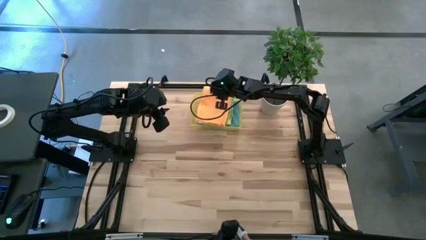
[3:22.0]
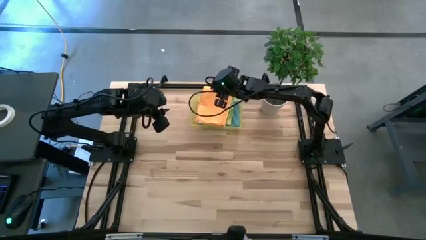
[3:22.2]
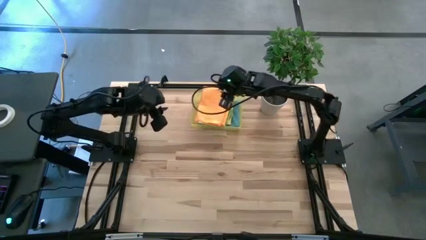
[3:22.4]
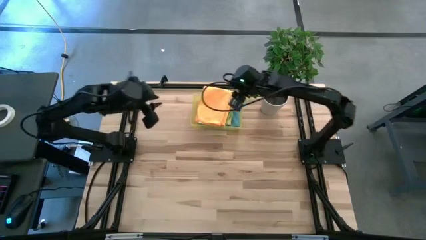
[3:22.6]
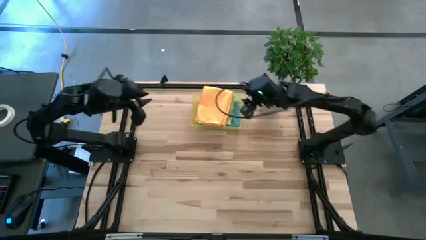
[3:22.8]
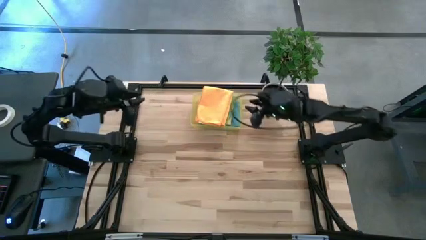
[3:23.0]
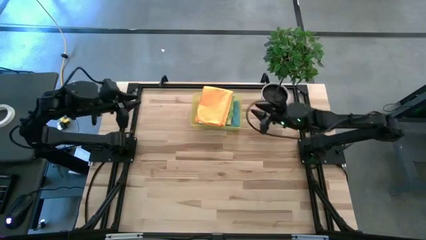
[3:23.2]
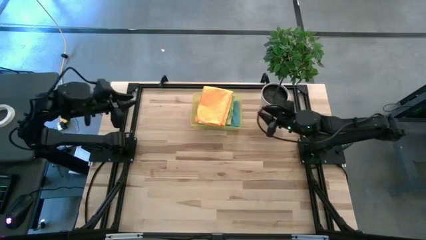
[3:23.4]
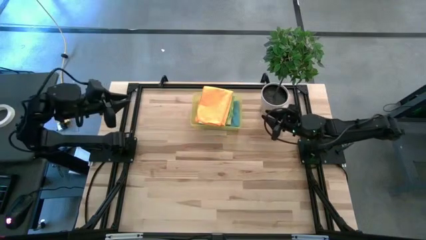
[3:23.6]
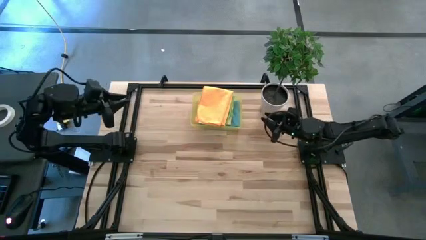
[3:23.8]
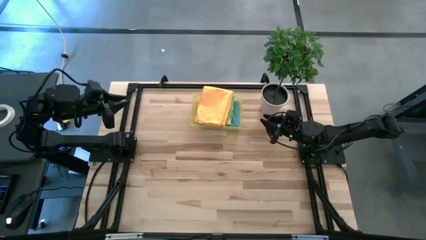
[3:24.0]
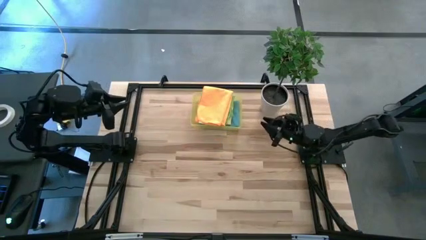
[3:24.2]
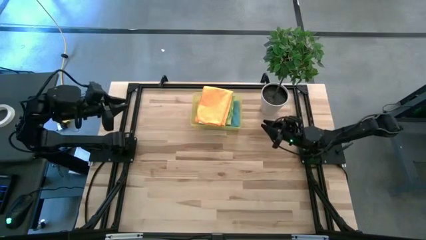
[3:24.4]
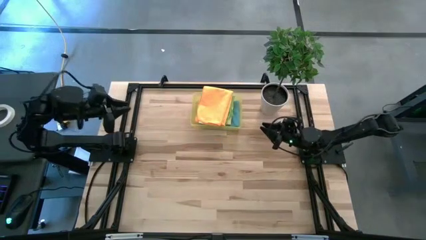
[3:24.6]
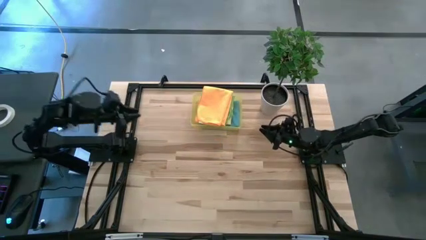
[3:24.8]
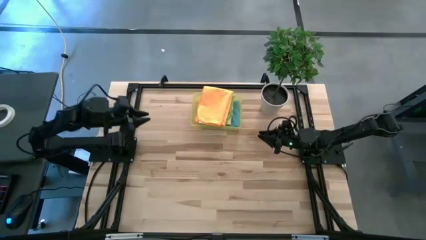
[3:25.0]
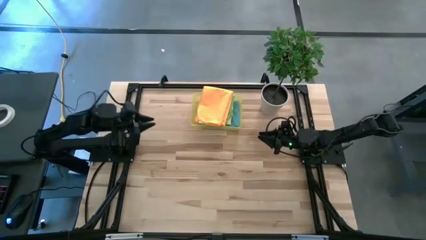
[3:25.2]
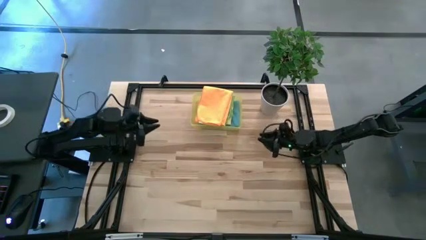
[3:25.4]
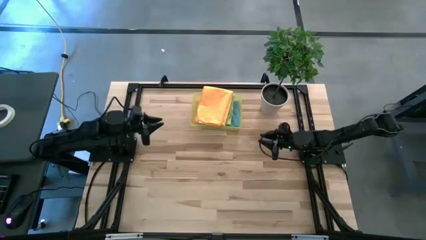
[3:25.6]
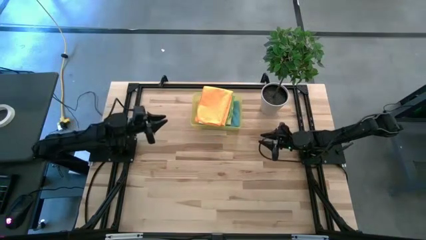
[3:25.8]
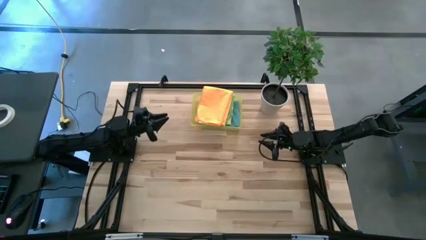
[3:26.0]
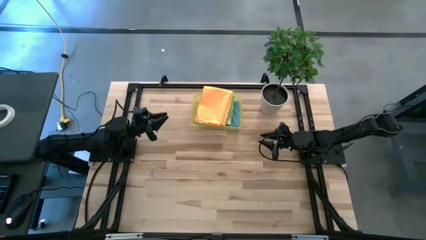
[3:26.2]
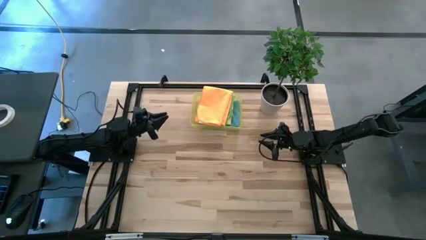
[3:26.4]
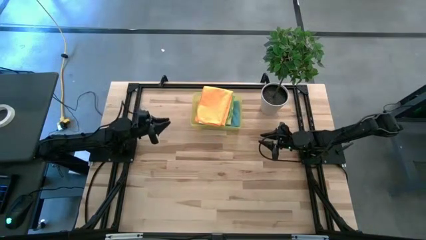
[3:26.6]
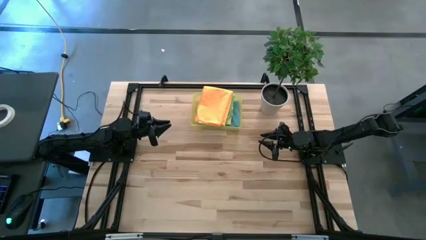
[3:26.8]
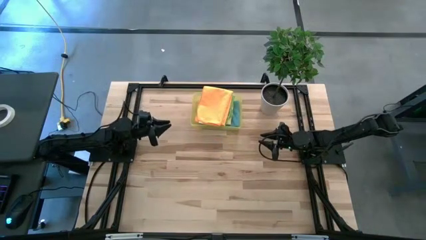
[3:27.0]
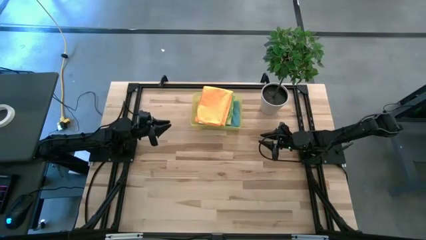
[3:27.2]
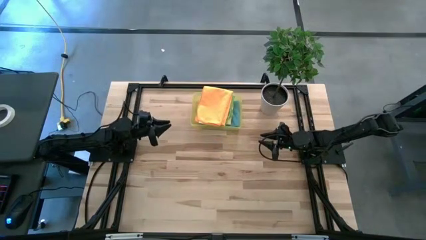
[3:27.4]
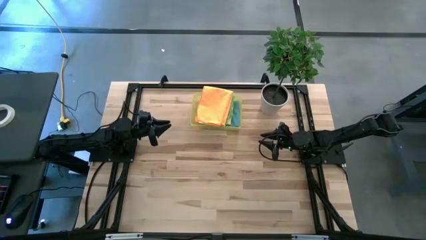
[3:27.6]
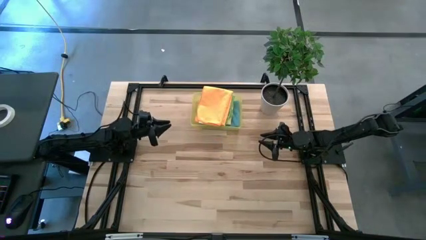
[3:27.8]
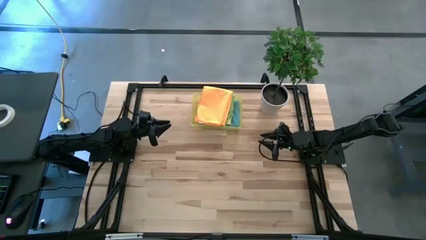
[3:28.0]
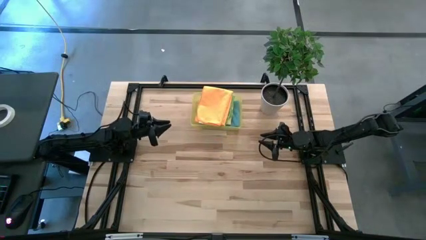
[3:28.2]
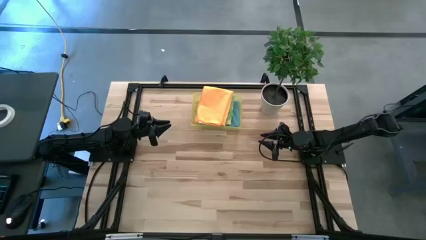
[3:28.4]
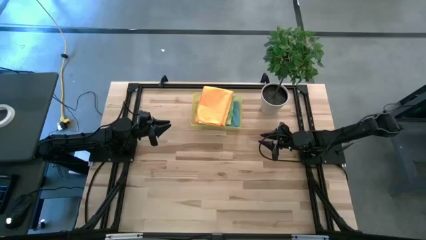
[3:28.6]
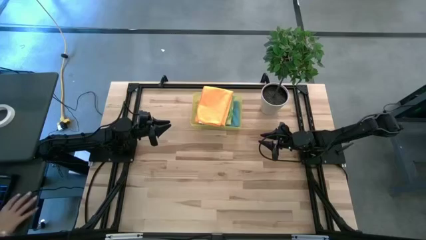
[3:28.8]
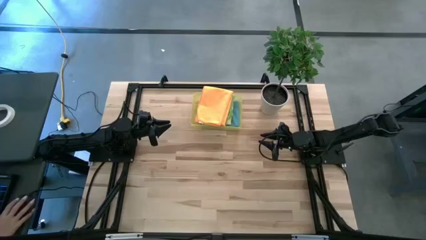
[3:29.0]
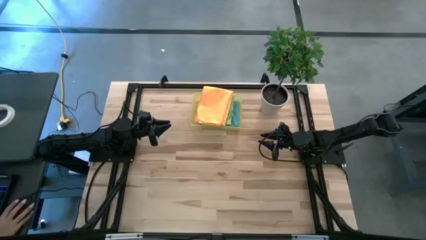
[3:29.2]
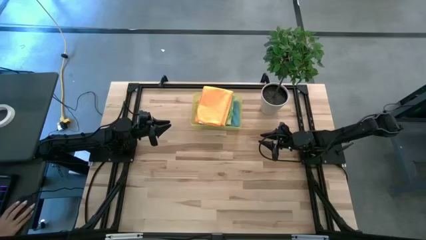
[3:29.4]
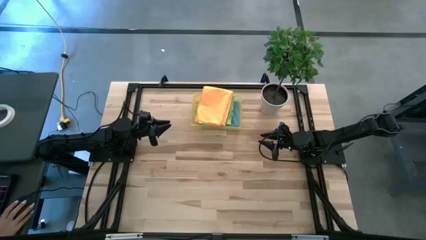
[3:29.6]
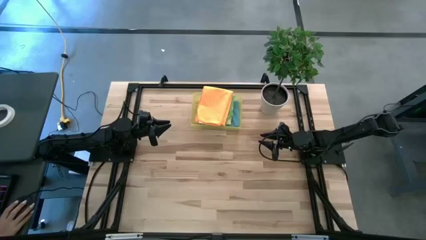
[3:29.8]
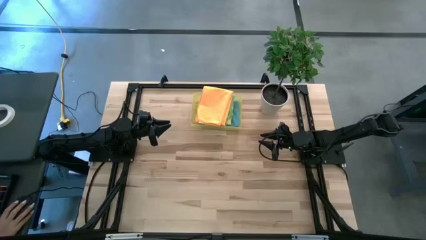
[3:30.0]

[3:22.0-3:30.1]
Task: Fold microfiber towels
Return to Home Position

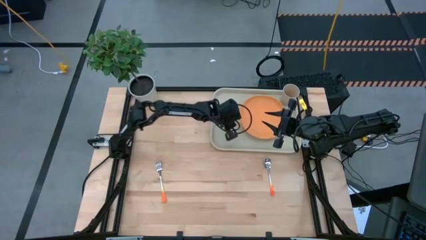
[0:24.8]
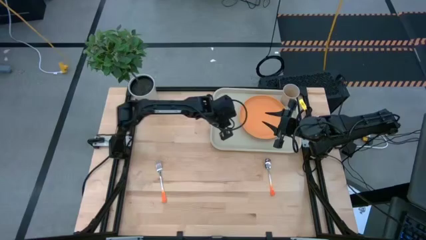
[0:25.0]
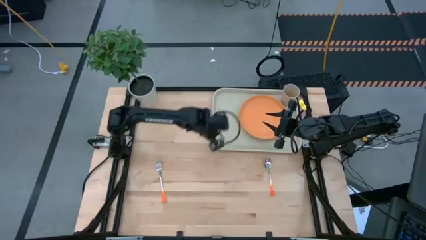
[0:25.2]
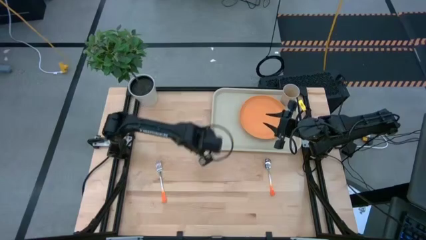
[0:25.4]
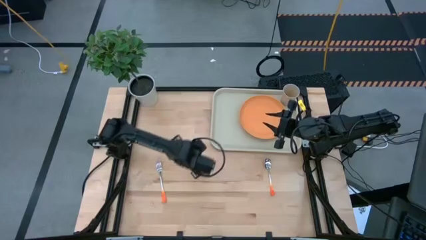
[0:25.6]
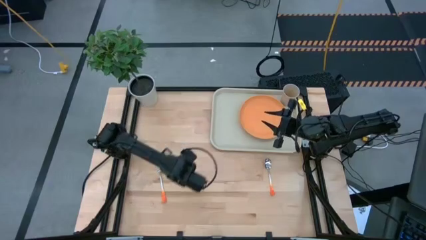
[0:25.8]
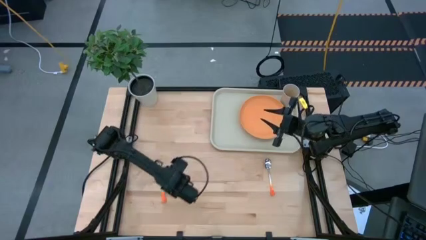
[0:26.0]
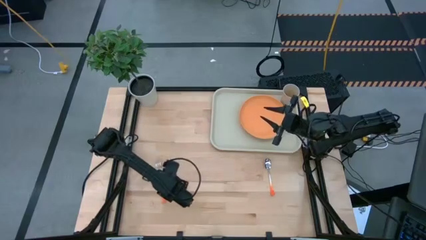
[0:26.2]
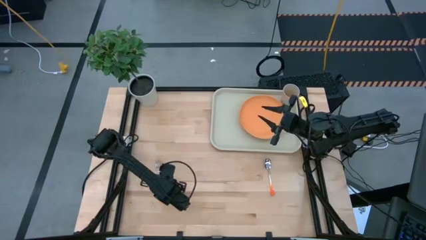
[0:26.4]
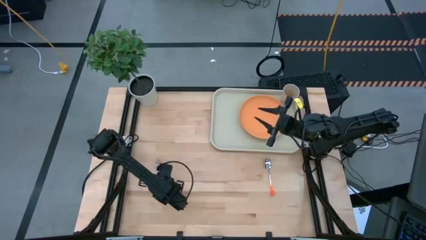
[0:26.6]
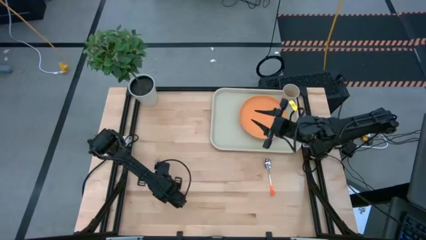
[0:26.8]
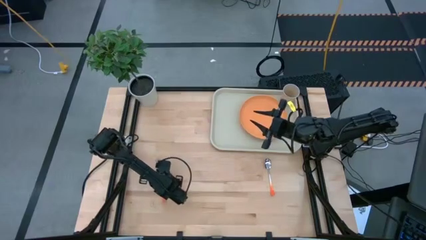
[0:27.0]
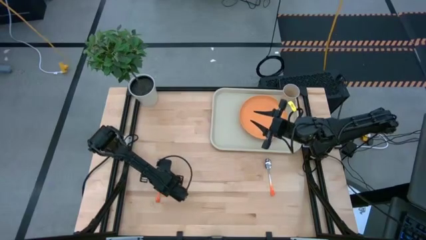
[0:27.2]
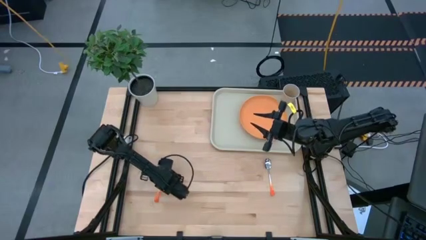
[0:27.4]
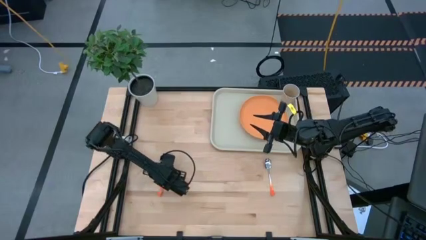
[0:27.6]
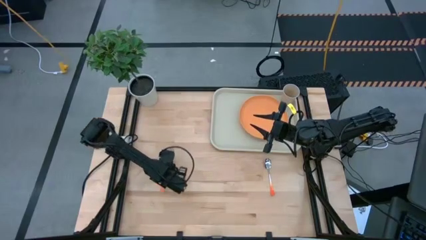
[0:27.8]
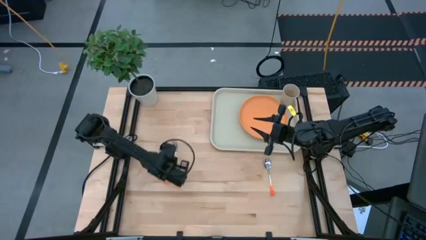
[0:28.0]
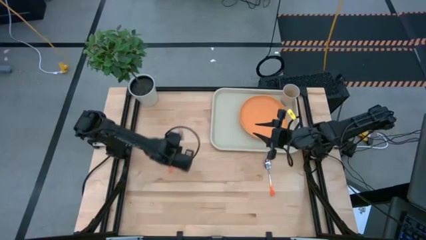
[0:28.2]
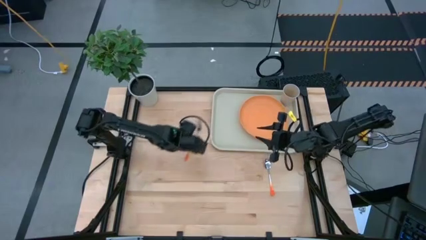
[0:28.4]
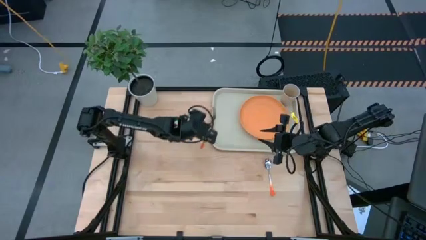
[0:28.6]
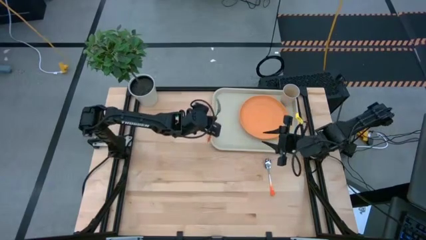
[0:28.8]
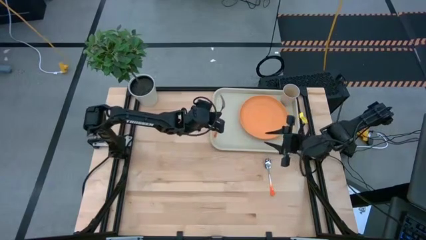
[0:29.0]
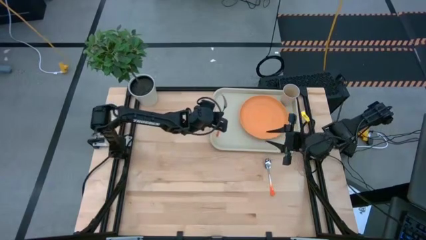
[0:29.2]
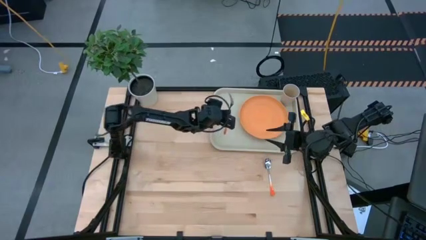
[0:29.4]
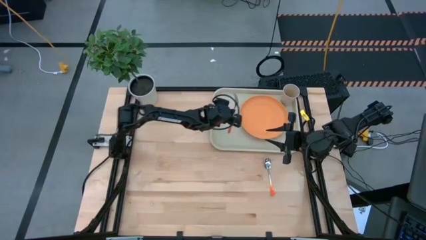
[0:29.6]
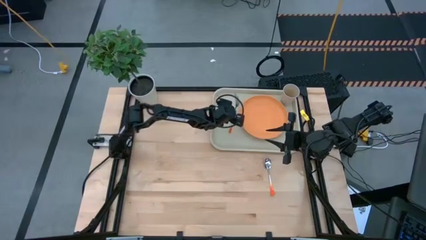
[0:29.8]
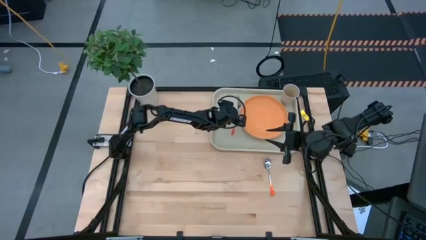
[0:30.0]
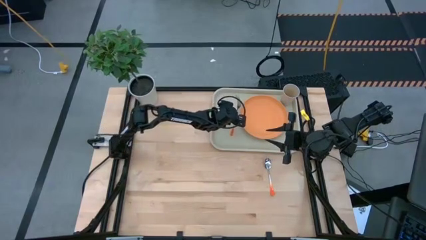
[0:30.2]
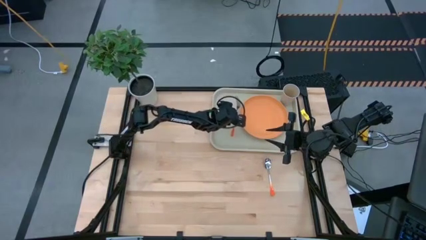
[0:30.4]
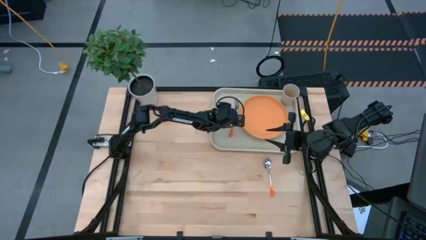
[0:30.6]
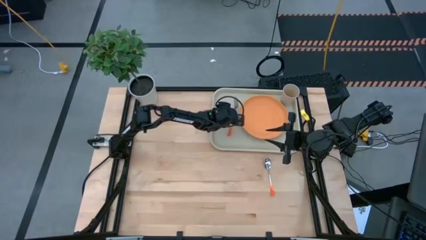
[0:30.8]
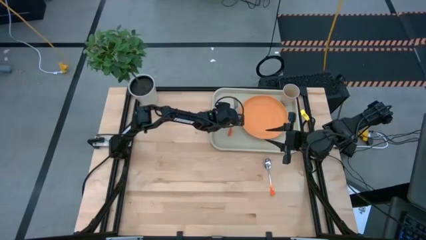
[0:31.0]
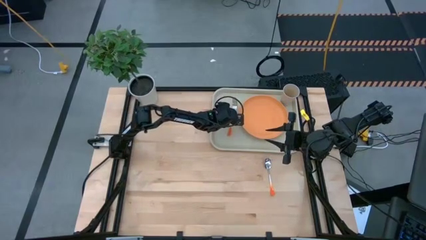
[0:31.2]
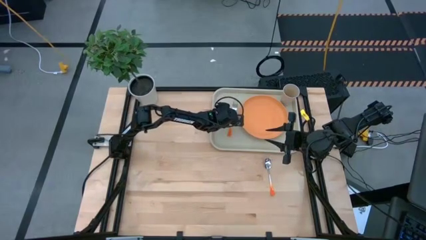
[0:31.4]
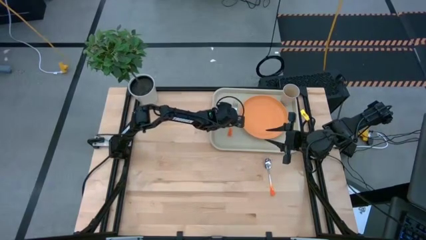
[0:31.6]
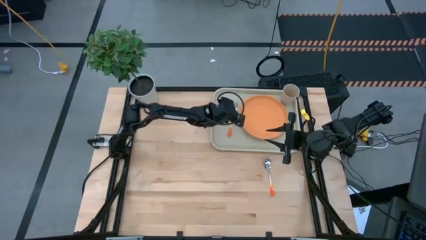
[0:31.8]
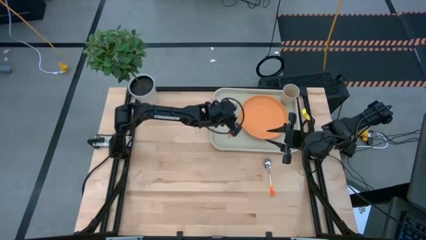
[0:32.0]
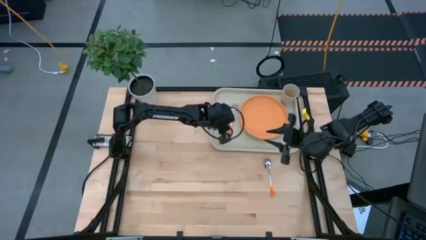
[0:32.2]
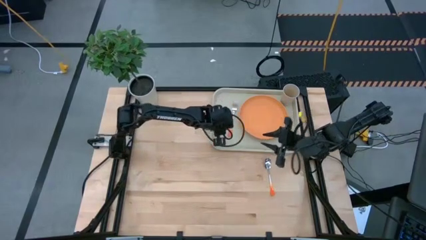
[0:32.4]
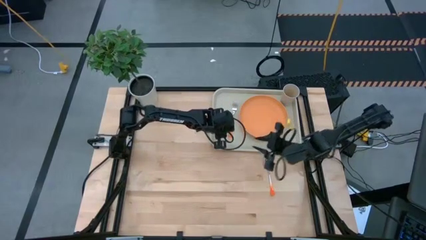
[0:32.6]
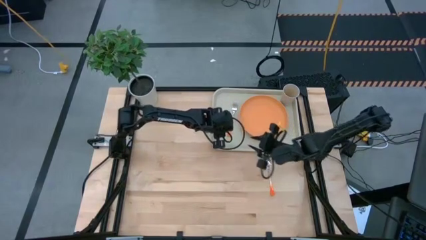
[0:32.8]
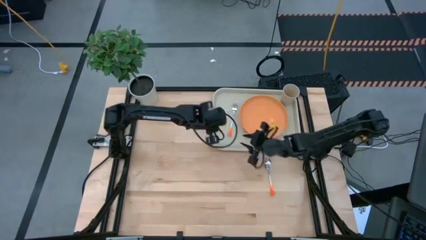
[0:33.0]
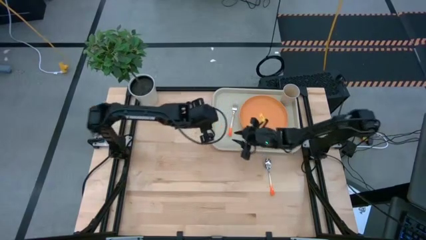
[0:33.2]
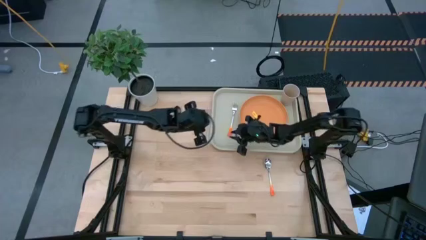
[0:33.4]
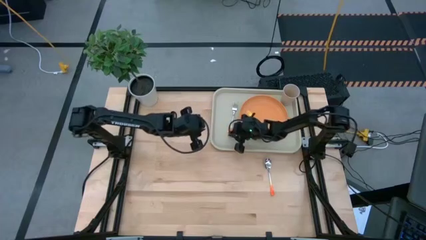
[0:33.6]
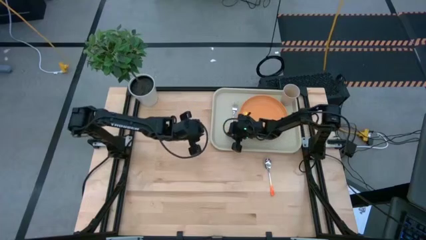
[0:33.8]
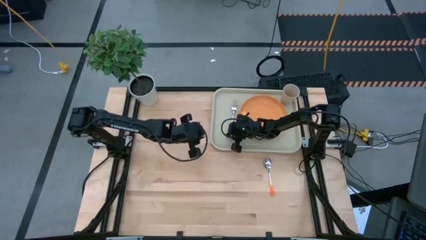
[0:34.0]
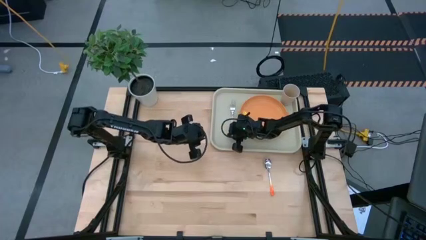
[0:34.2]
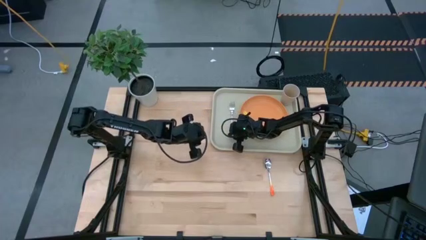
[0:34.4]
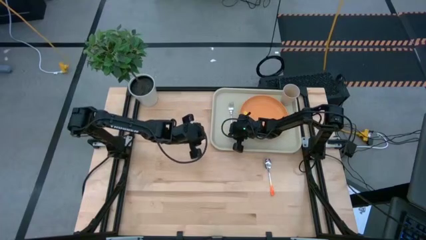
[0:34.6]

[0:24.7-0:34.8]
Task: Pick and place plate/cup/fork/spoon on tray
Put the orange fork to the left of the orange plate on the gray tray
